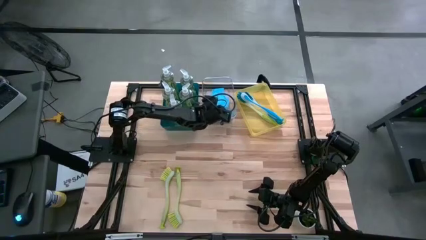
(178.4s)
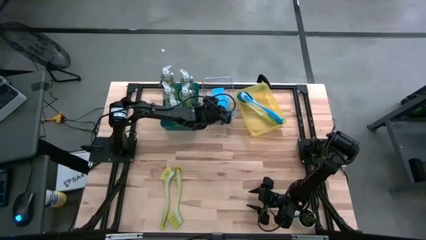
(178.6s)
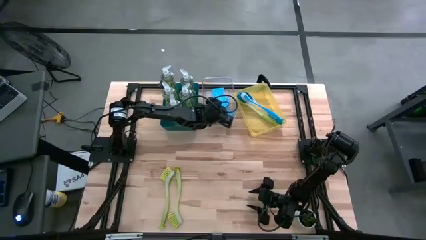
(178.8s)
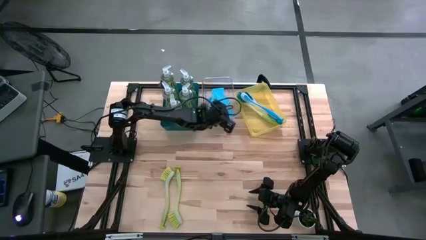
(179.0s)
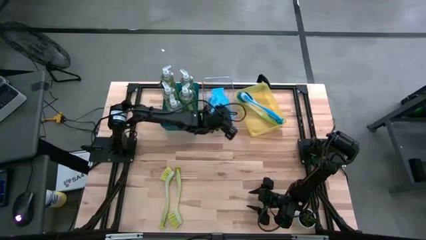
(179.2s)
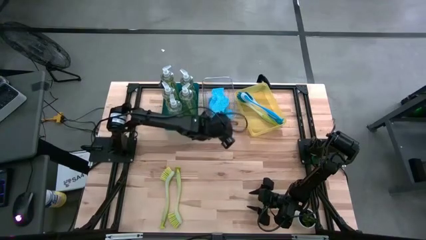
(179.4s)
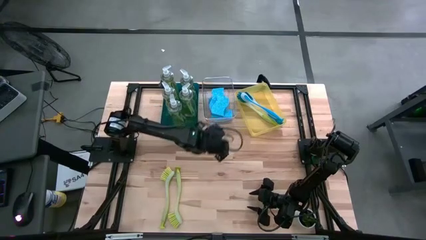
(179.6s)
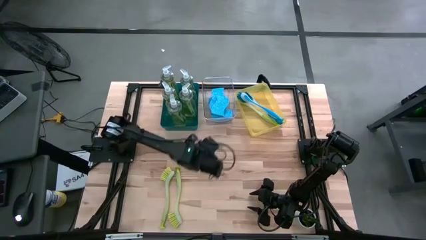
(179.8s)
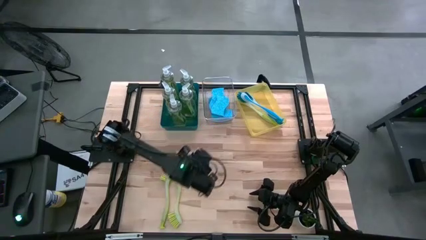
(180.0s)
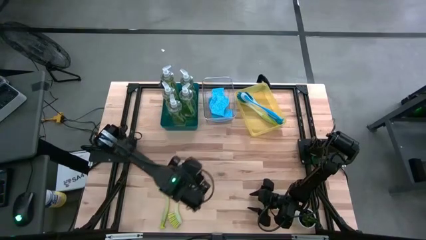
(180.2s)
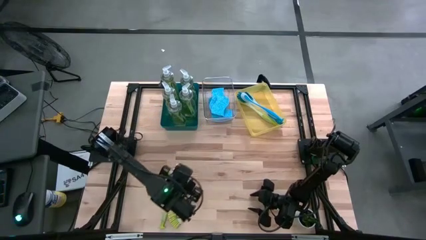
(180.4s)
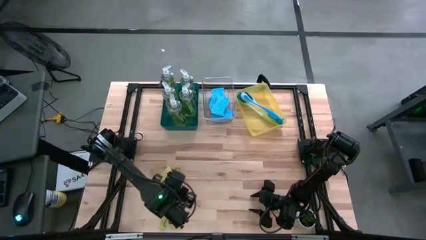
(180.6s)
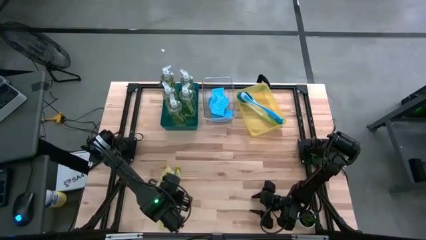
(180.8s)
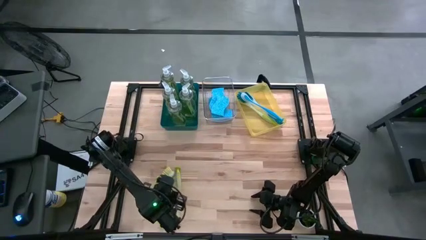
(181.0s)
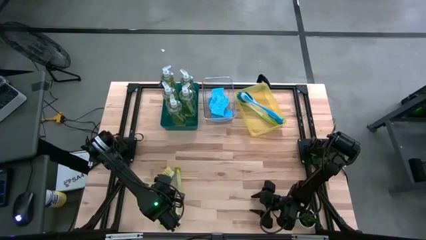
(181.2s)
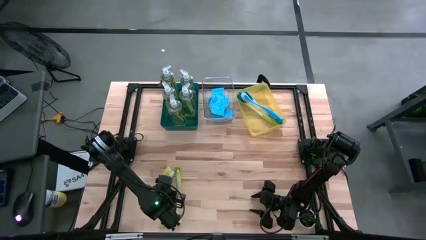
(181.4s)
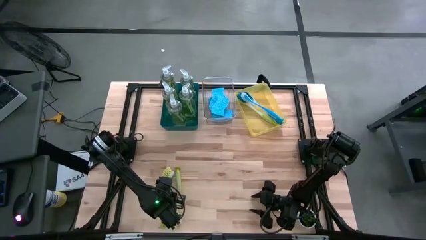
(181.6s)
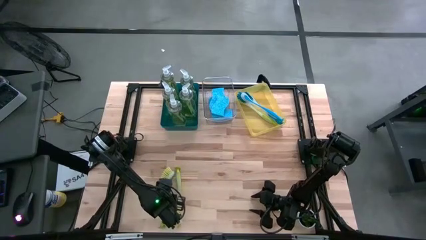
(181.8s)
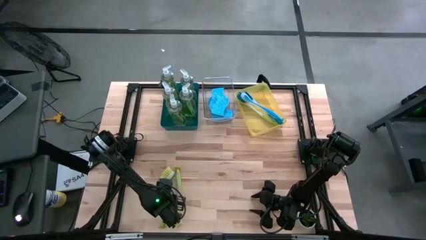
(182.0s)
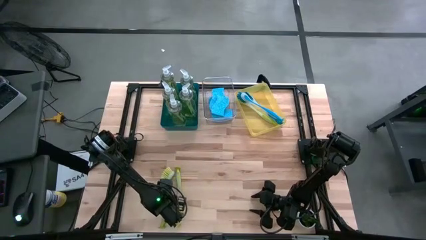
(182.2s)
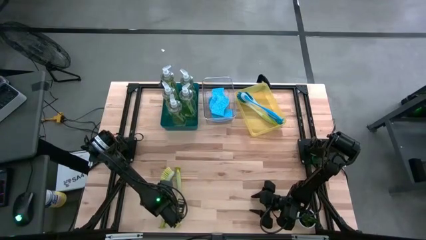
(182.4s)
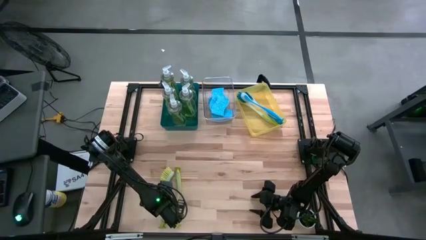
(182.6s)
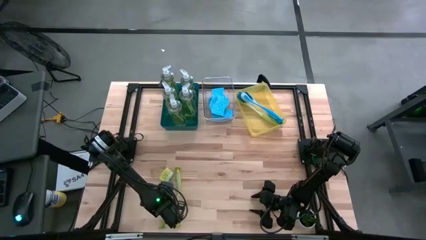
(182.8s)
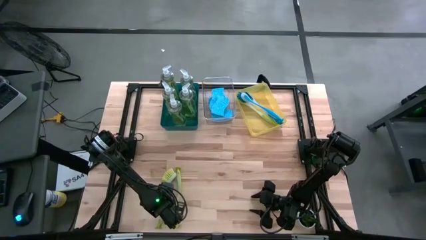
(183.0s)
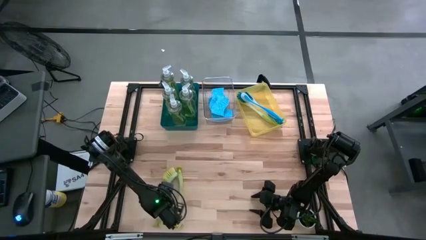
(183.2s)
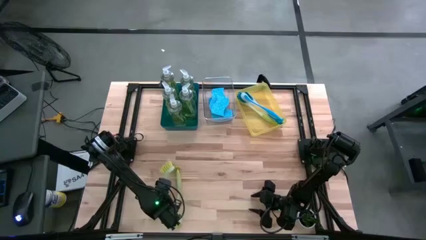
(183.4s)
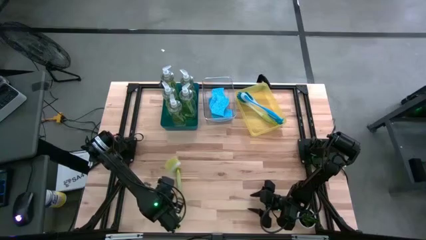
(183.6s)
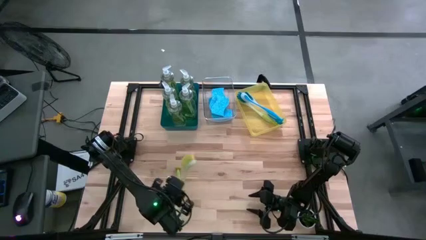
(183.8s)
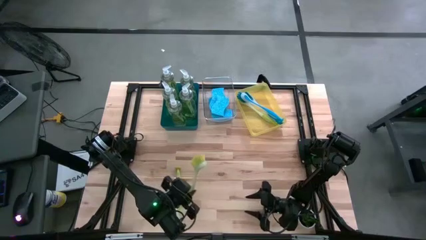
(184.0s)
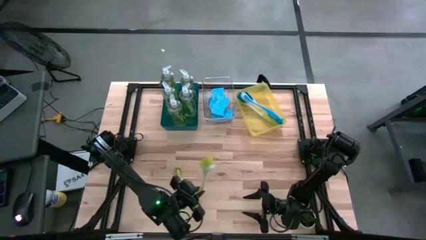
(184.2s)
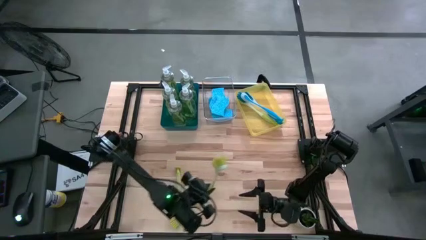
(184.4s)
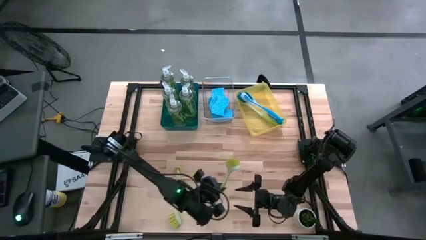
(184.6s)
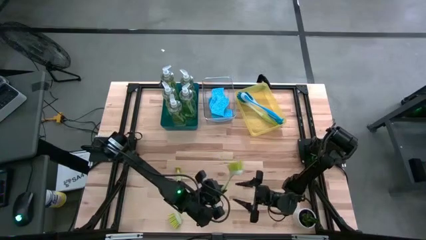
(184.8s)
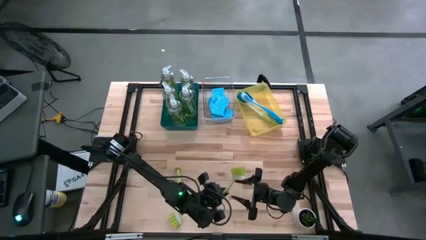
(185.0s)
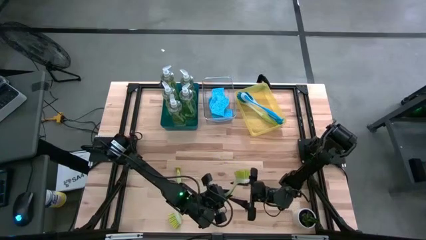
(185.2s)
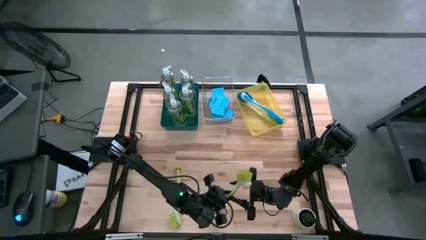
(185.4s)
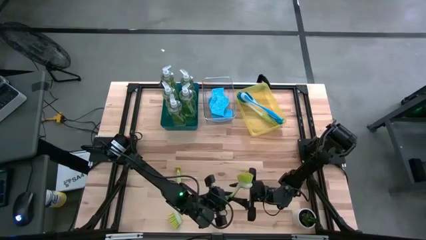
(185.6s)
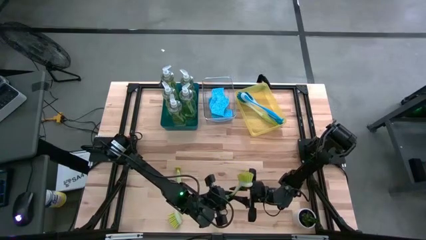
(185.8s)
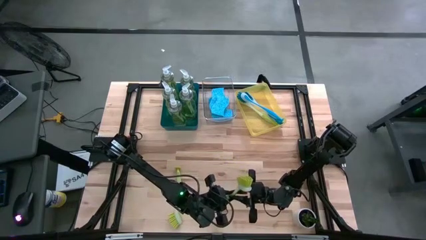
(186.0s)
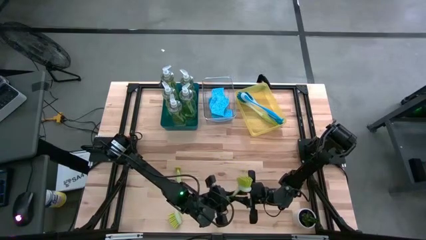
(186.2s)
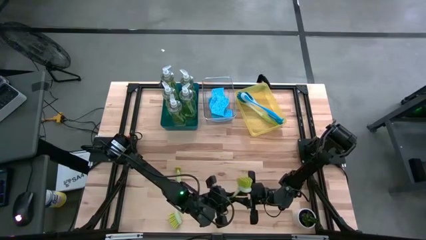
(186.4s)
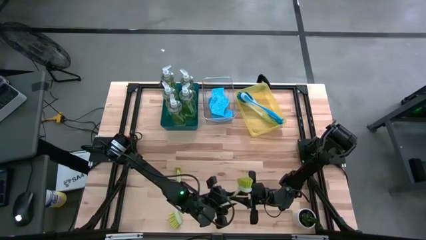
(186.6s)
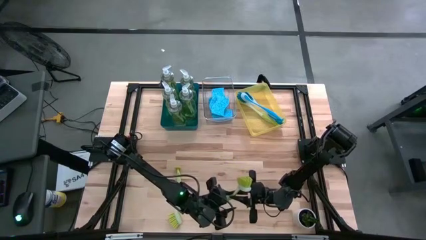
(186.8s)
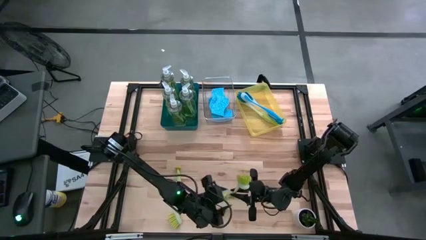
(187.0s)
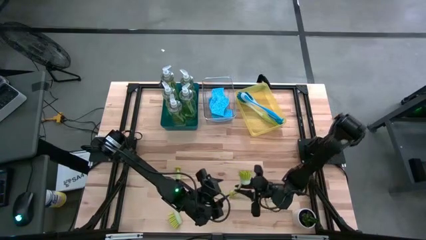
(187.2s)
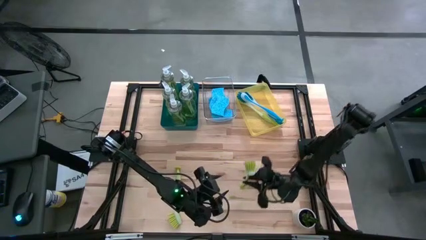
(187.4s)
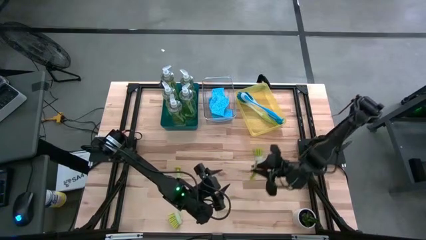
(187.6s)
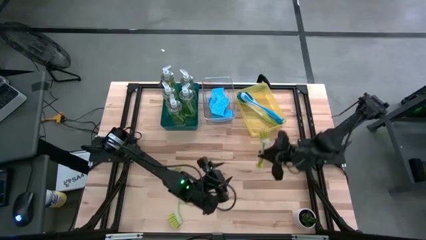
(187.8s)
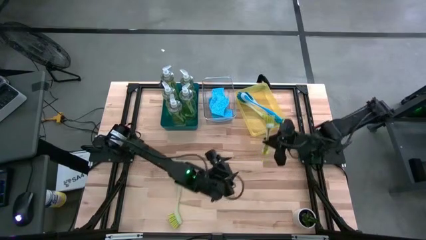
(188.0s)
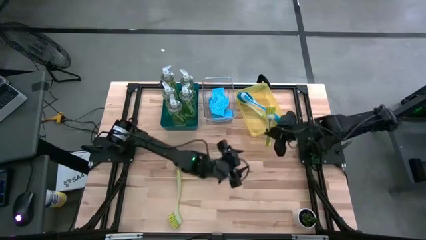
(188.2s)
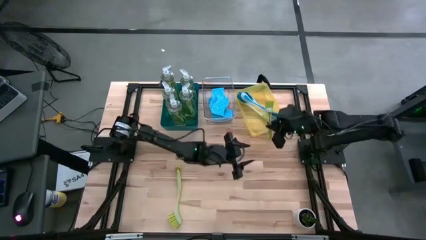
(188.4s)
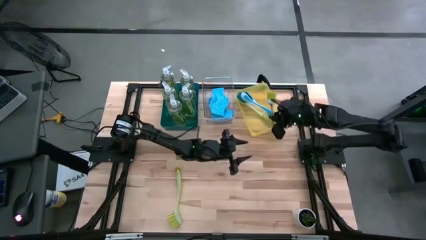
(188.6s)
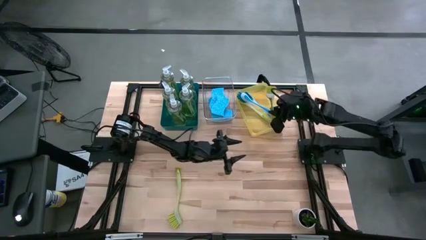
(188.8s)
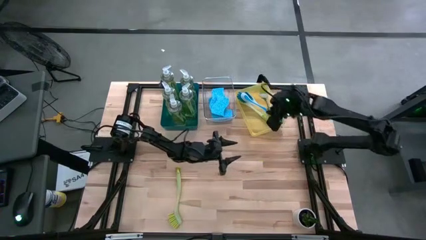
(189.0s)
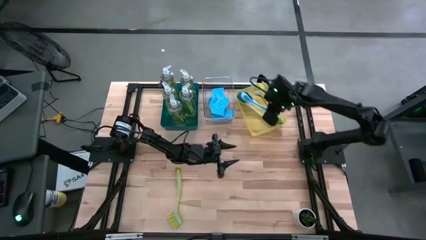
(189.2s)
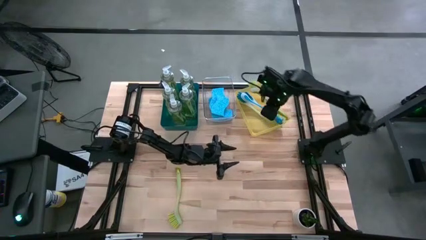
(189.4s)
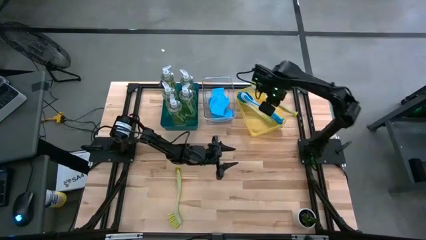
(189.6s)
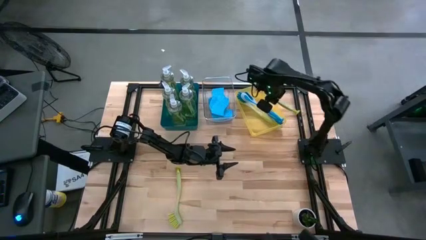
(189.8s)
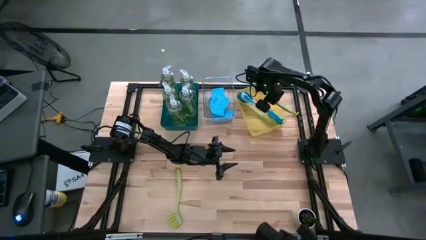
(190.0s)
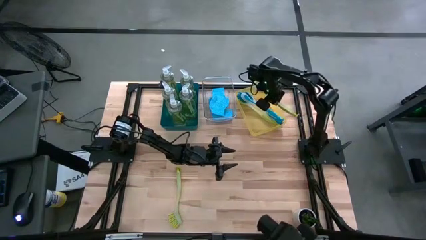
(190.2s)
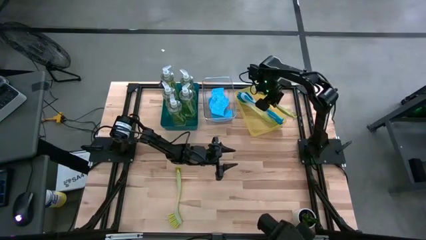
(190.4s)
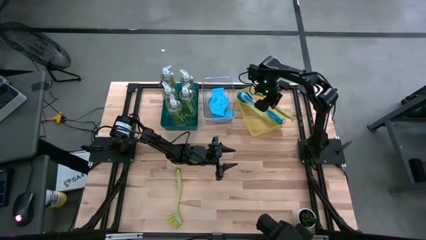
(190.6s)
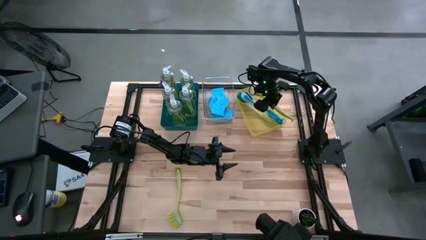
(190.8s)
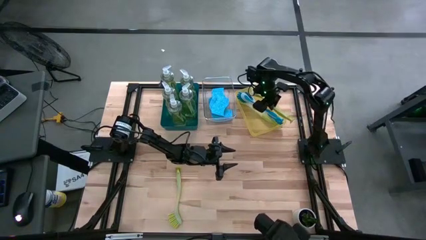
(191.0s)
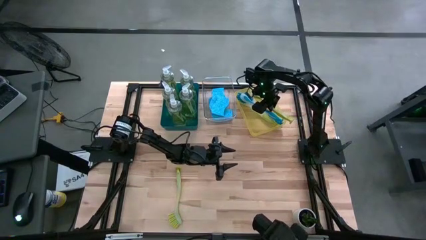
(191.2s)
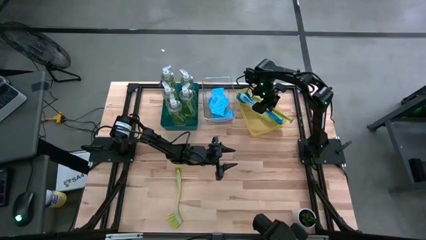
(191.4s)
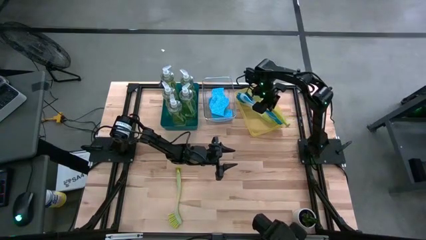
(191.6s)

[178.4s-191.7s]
Task: Pick & Place Kitchen Sink Supplies
Put the yellow dish brush into the yellow bin

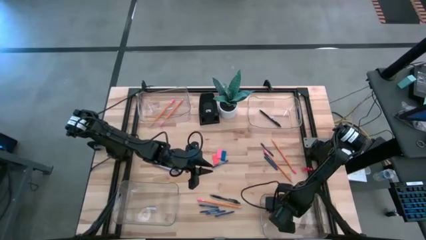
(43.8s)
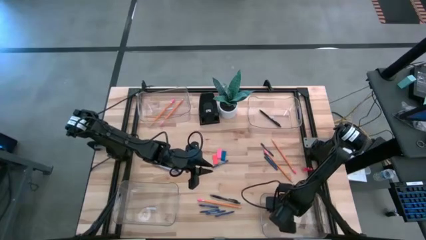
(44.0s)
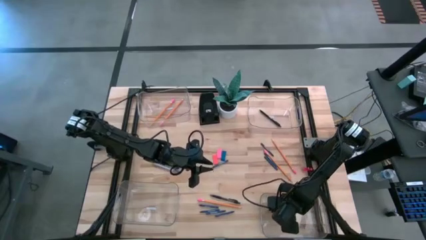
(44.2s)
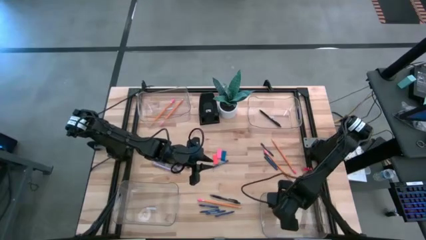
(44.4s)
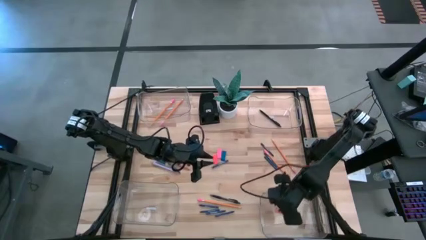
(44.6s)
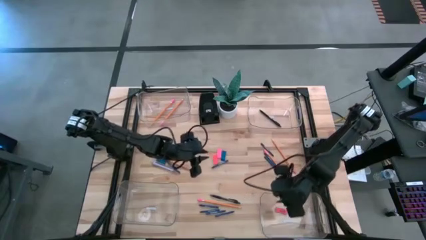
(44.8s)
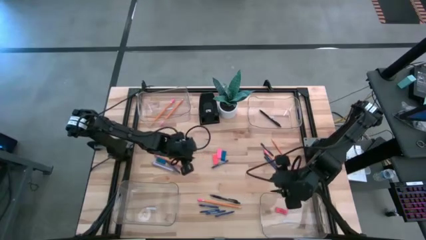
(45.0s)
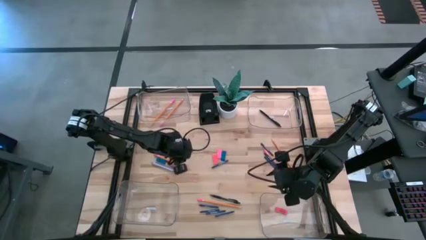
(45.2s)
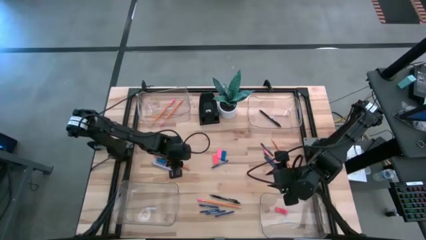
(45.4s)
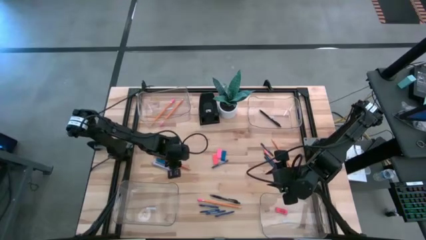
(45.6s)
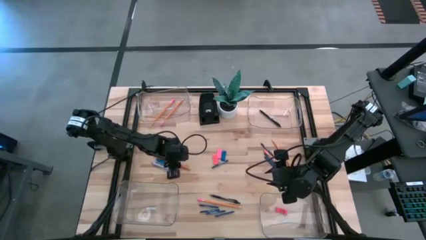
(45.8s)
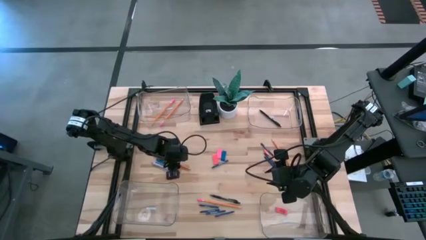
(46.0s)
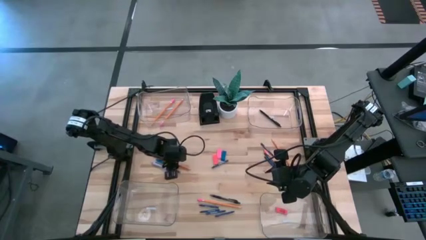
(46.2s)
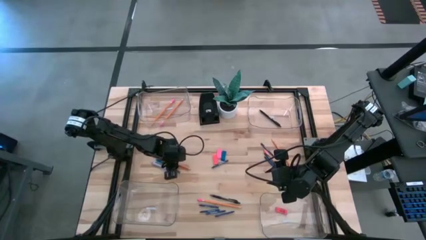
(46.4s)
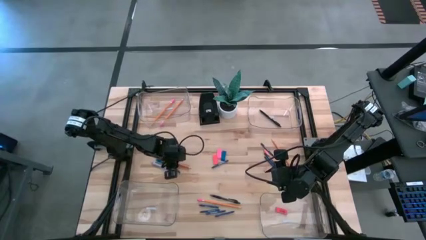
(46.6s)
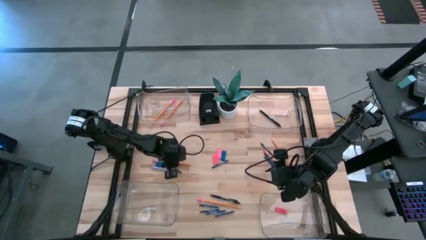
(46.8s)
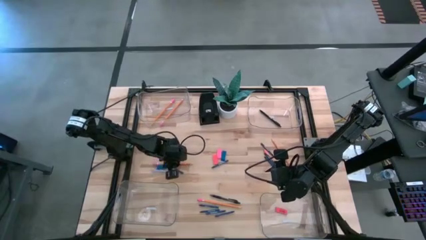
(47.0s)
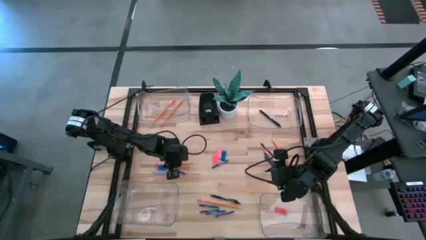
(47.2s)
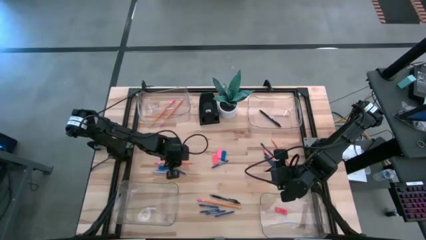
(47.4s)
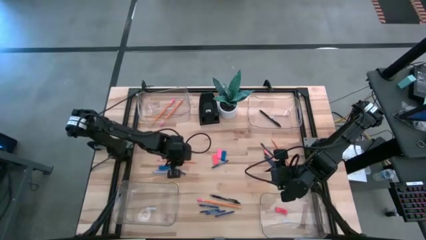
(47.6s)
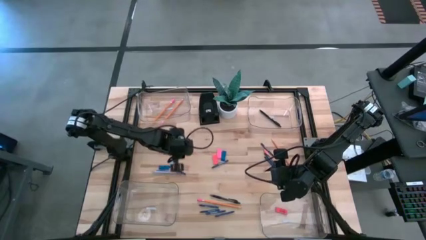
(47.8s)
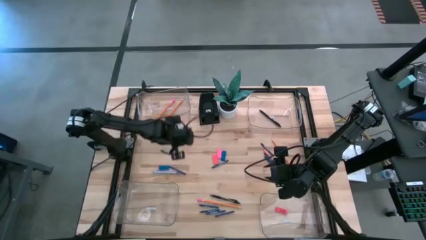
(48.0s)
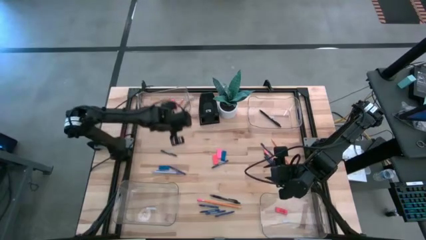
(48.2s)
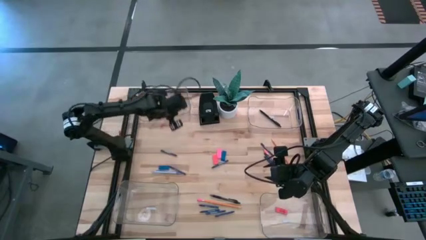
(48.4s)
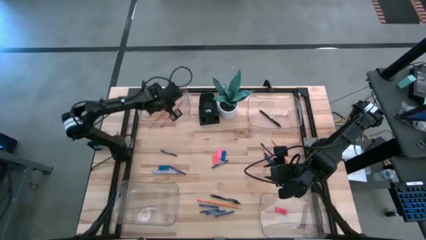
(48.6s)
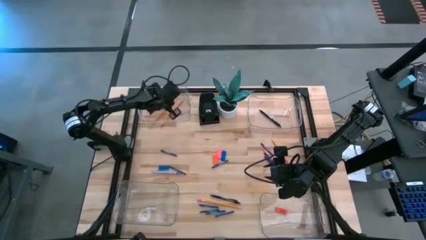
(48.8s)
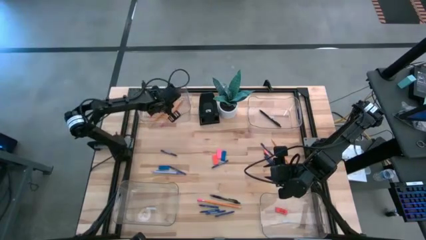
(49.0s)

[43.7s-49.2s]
Task: Sort crayons/erasers/pens/pencils in bins
Put the orange pencil into the top left transparent bin
